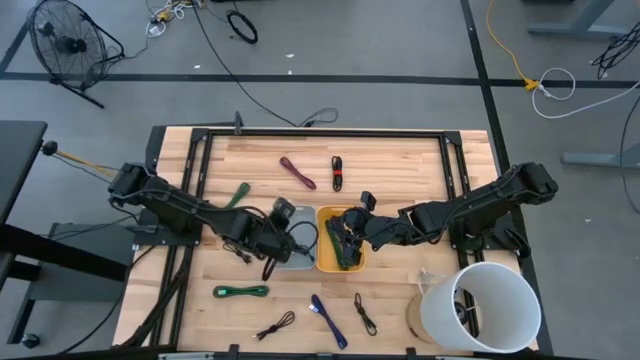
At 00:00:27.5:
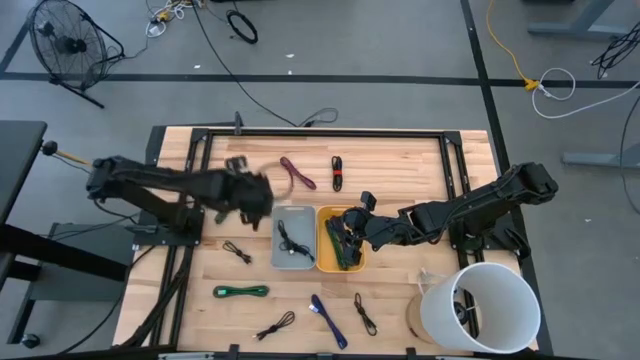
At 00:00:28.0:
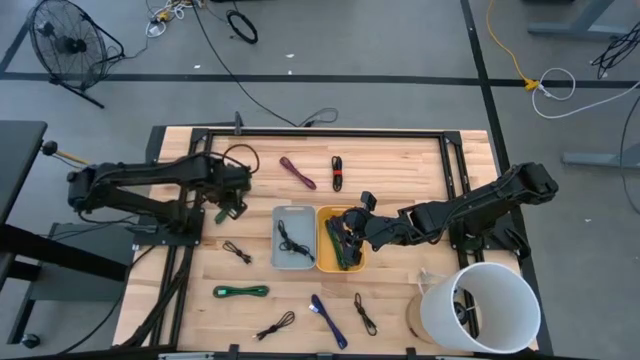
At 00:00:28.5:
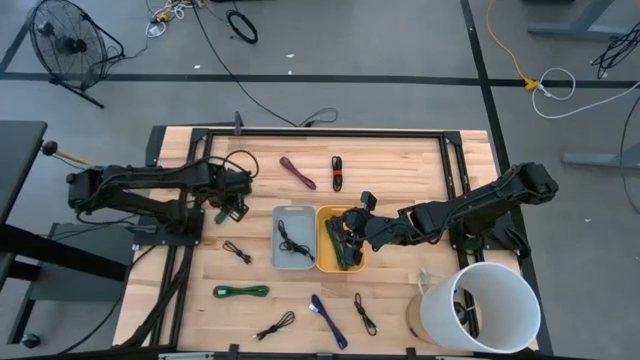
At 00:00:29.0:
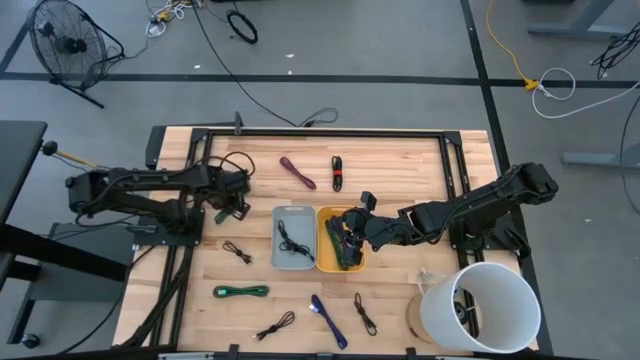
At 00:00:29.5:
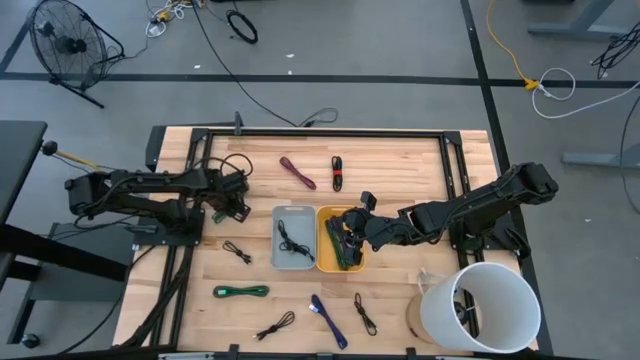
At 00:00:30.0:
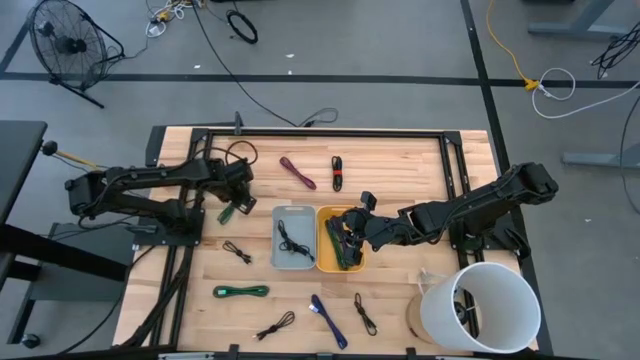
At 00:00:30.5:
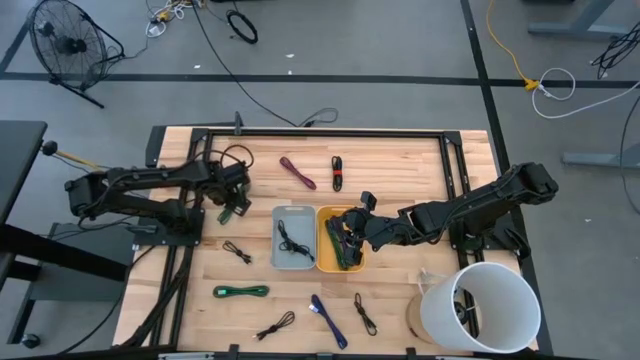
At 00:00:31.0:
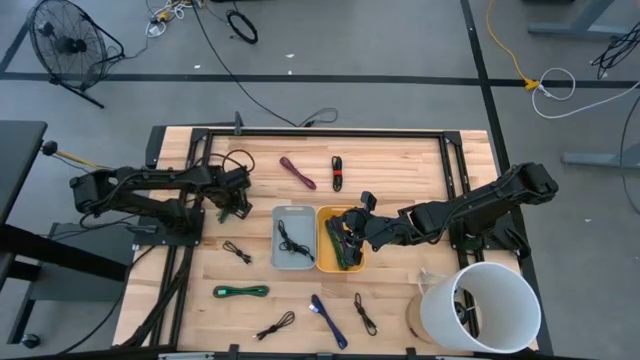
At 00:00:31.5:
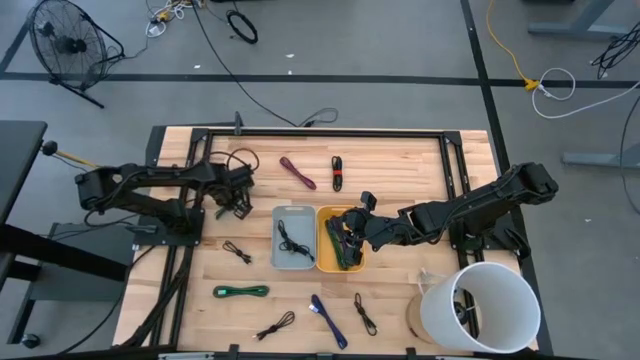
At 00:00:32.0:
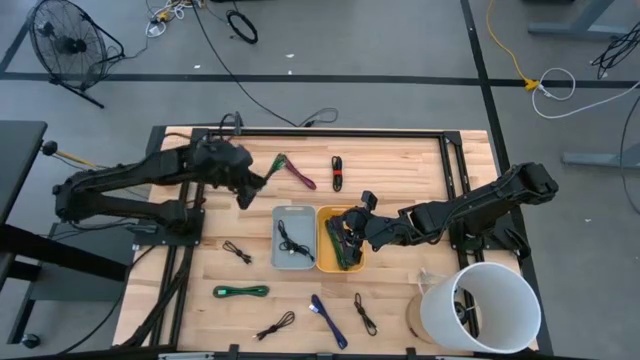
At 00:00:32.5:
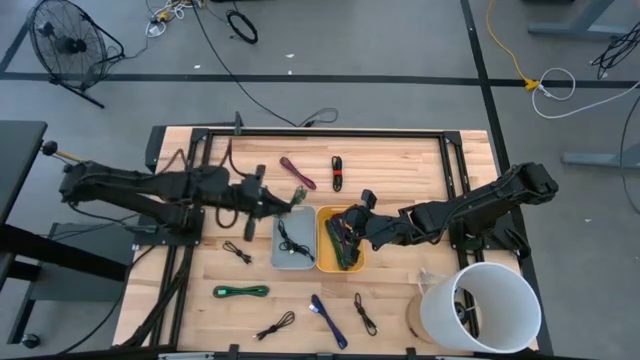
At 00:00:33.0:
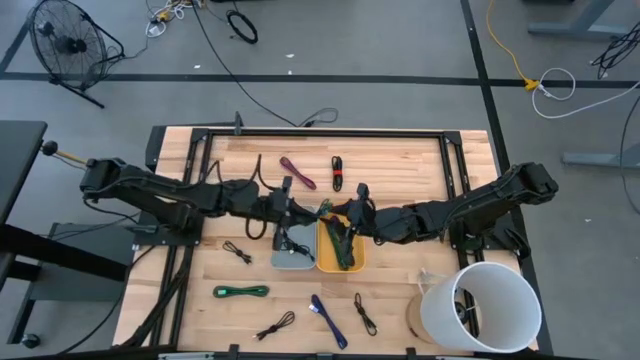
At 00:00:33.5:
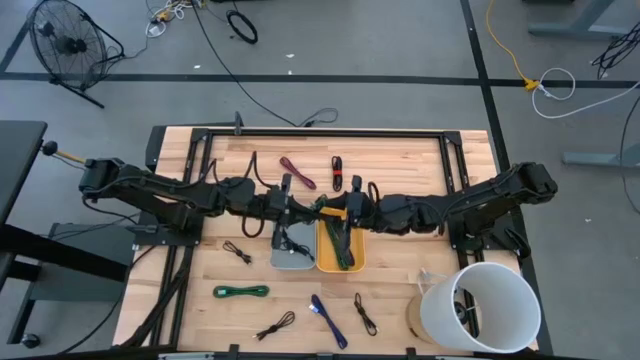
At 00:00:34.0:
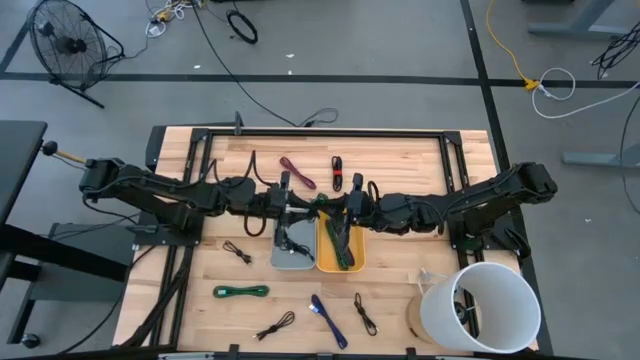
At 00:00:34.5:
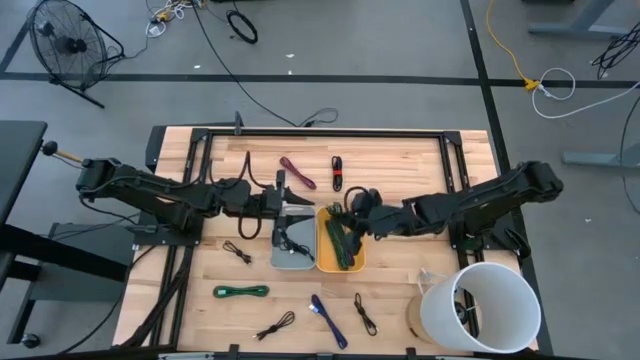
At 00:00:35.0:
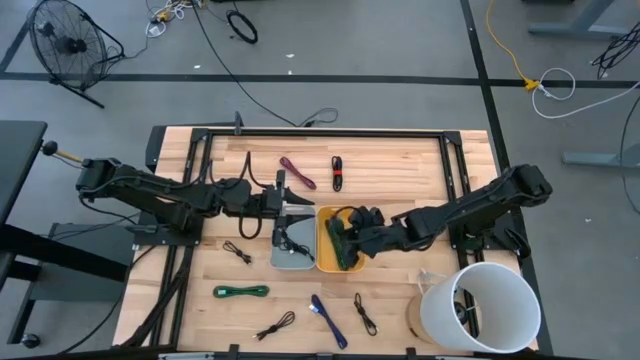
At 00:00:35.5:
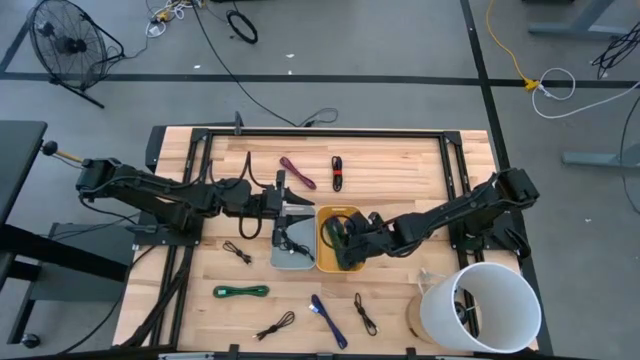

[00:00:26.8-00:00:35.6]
Task: Pick & Place USB Port
Put the green charger cable into the yellow bin

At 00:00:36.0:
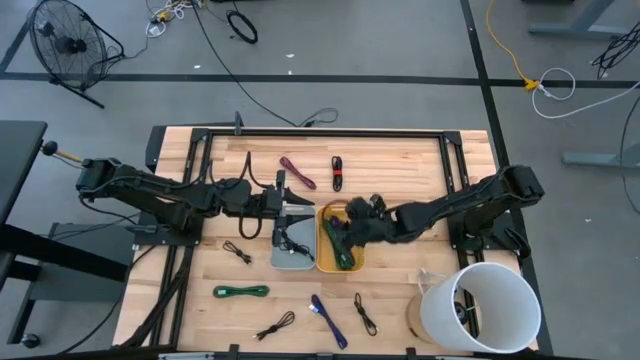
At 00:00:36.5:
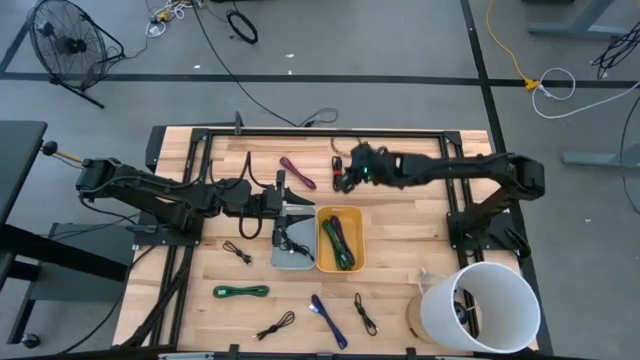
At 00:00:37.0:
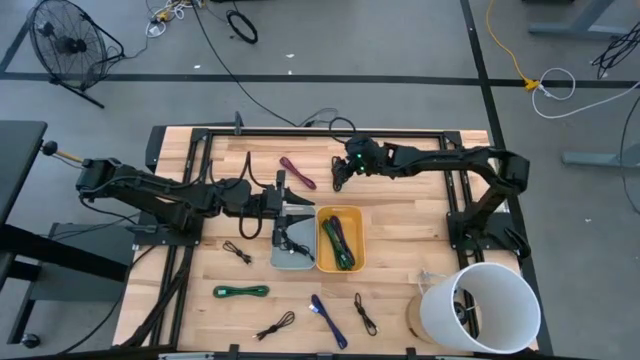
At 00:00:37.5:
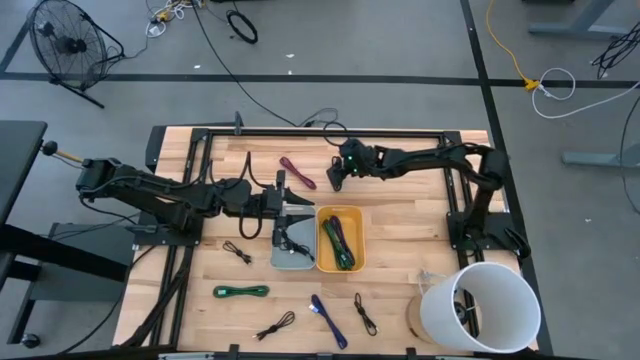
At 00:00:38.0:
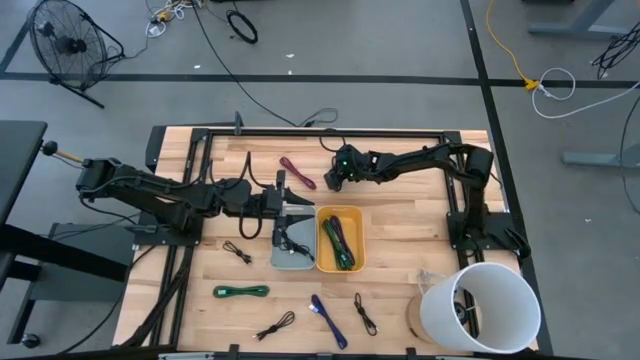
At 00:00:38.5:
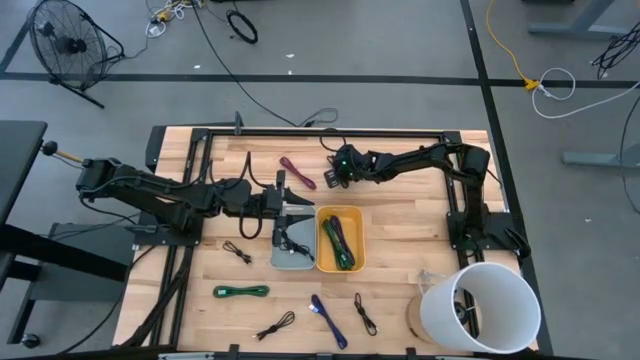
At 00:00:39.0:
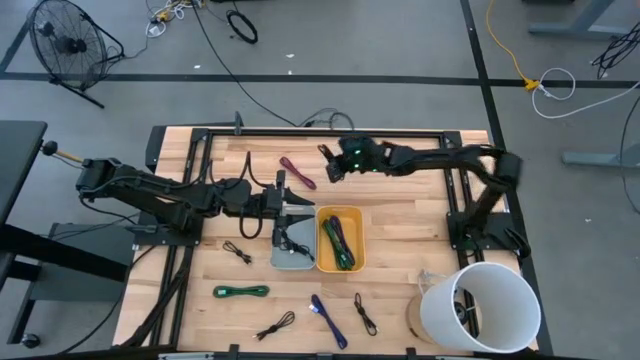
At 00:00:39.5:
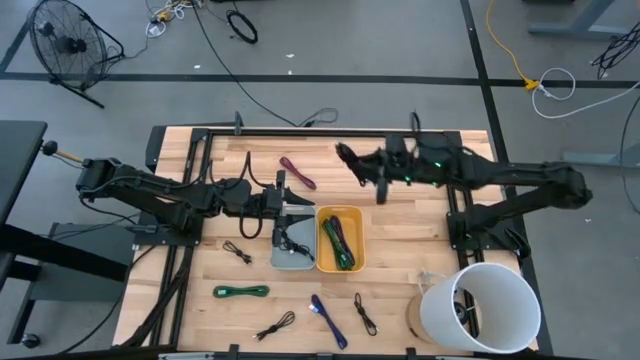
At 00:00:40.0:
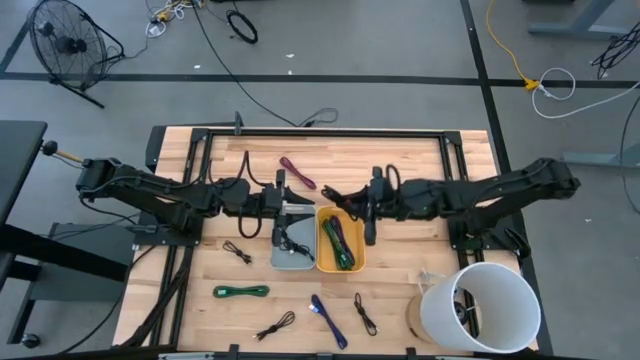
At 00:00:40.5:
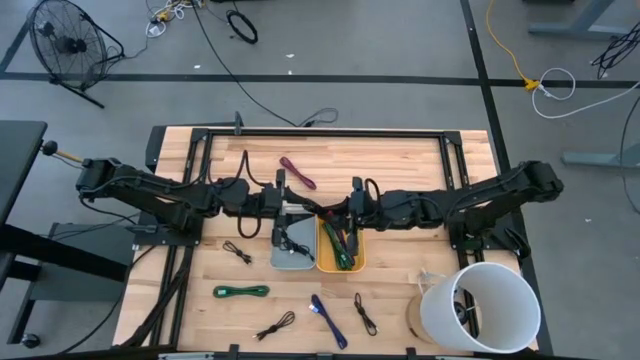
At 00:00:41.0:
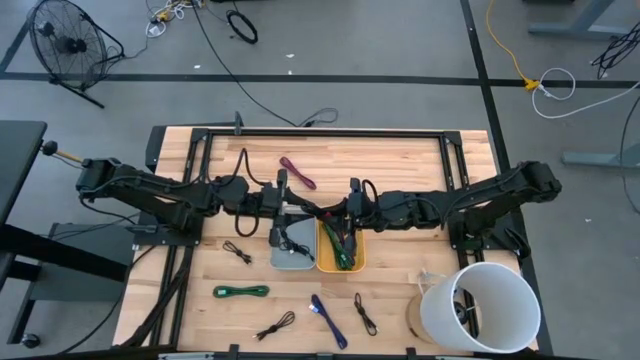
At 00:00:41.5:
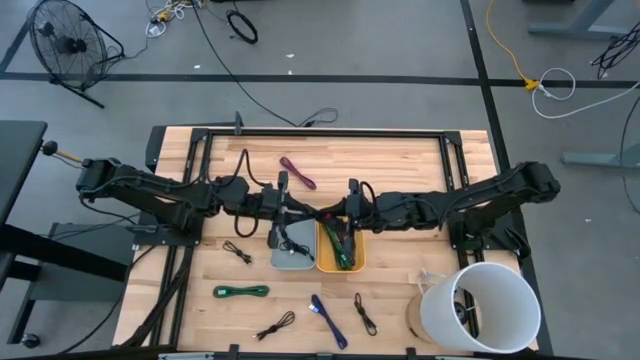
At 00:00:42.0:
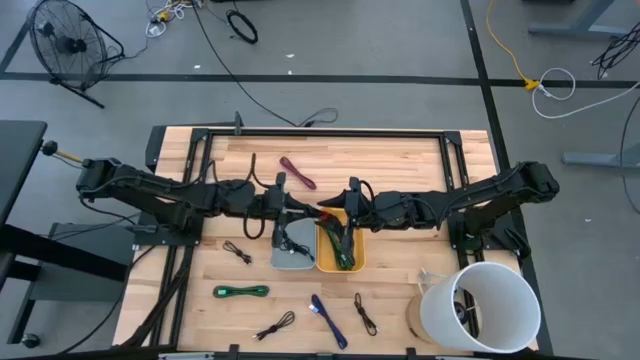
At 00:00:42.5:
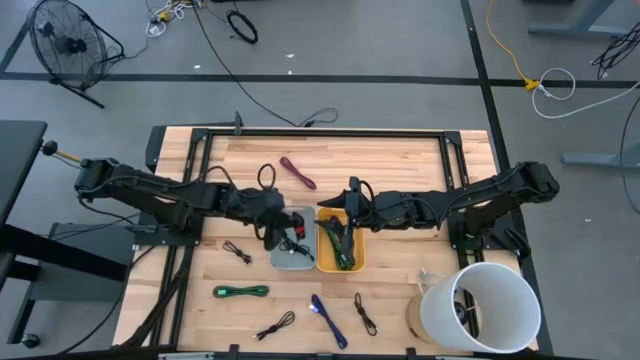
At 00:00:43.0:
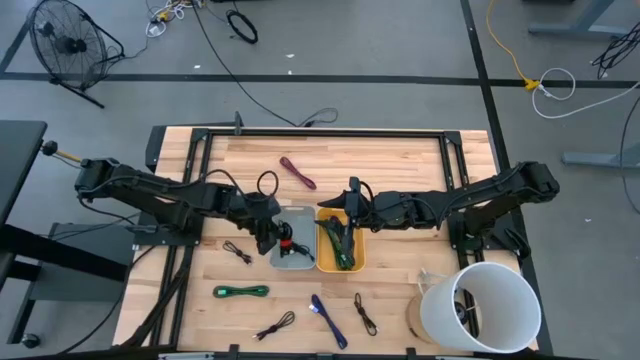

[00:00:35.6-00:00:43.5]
Put the black charger cable into the gray bin

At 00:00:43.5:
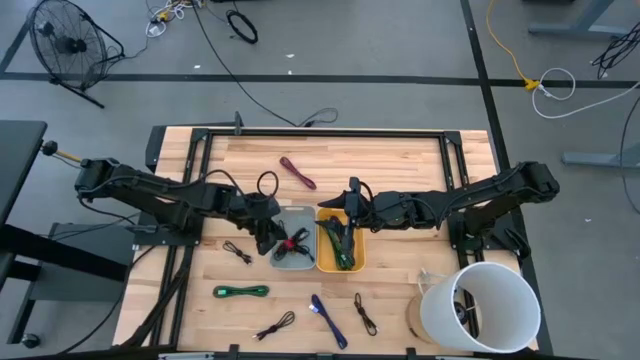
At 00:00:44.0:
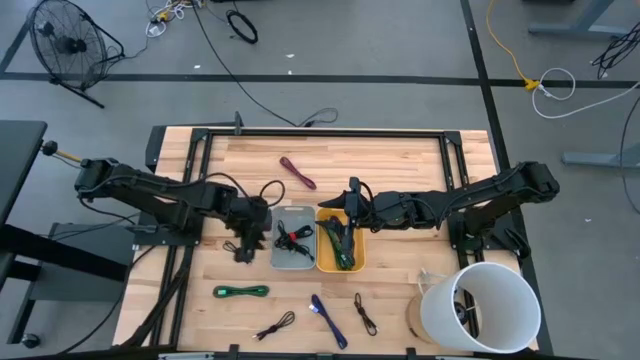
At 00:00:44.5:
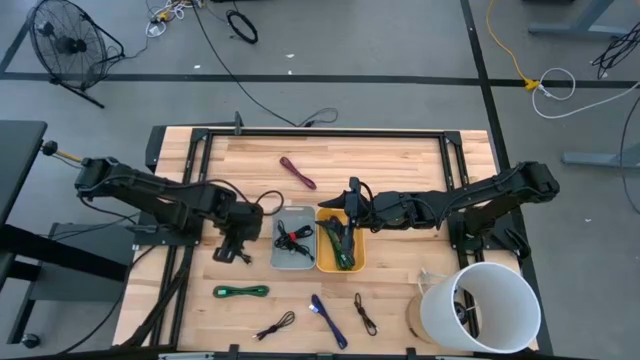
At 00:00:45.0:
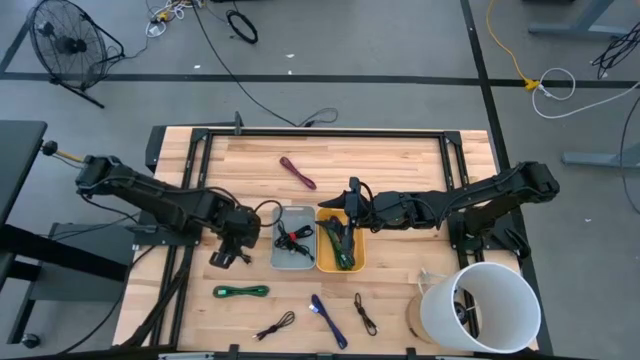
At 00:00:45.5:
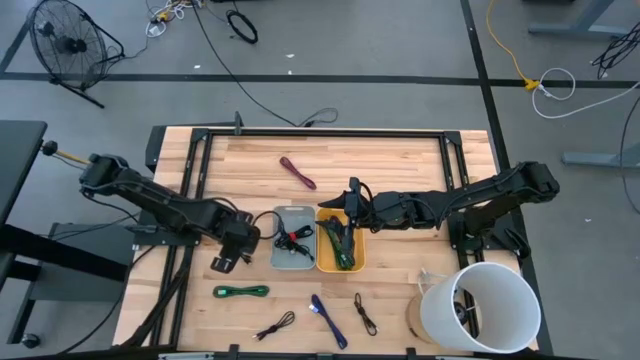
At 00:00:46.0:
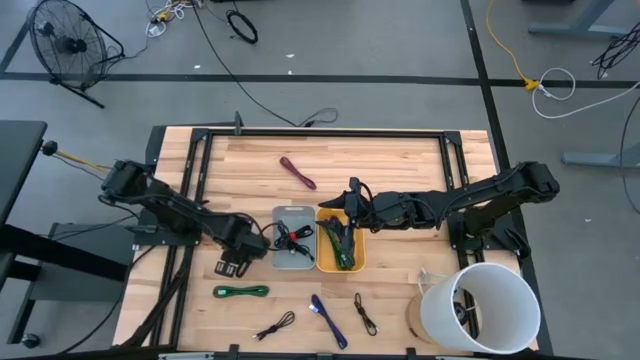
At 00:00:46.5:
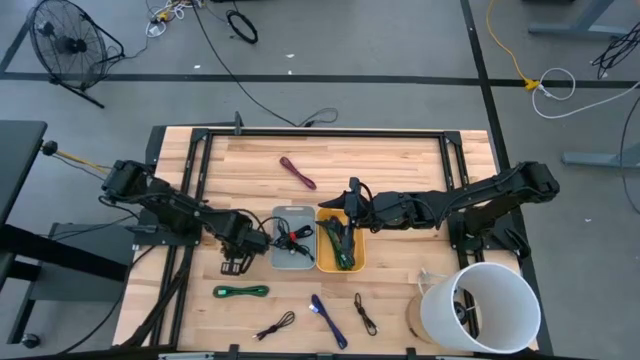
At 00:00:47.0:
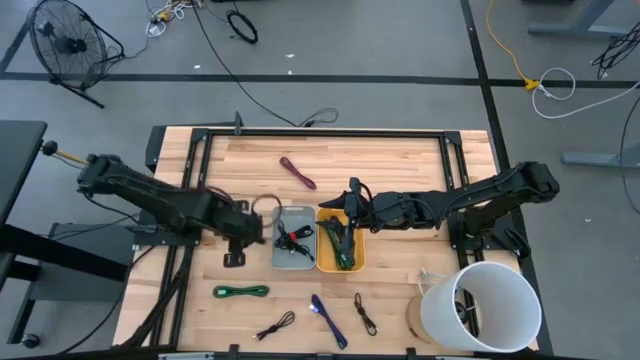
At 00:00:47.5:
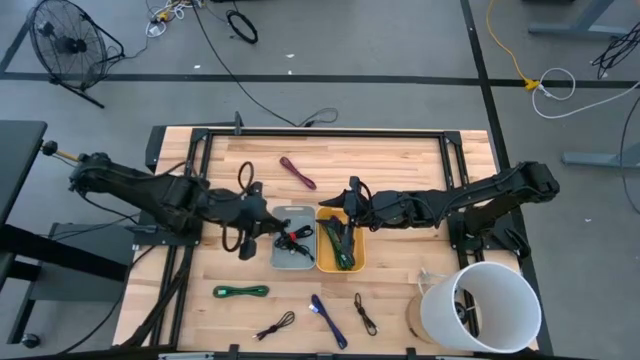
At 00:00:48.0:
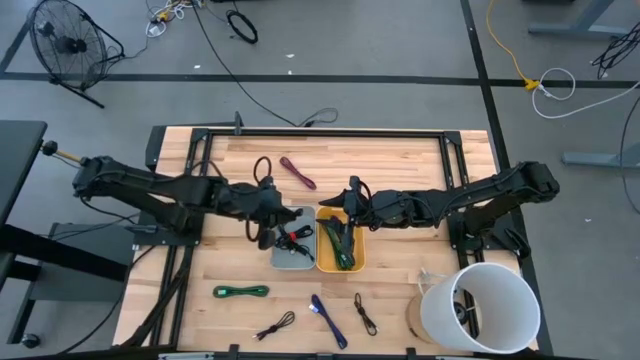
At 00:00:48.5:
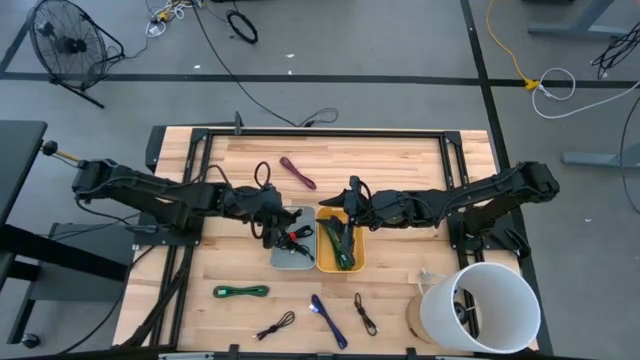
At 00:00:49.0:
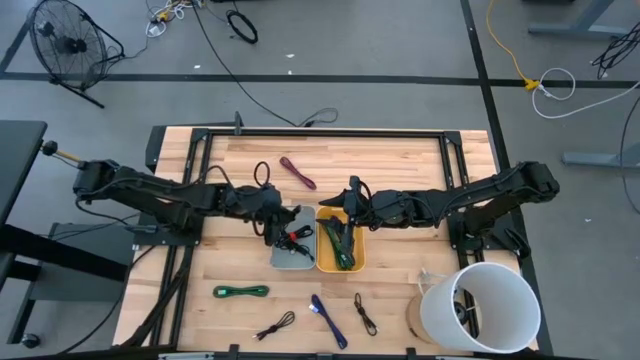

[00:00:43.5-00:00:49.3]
Put the black charger cable into the gray bin
